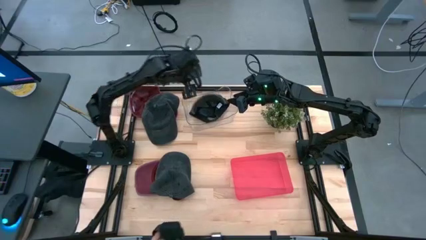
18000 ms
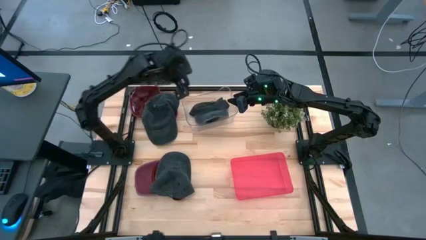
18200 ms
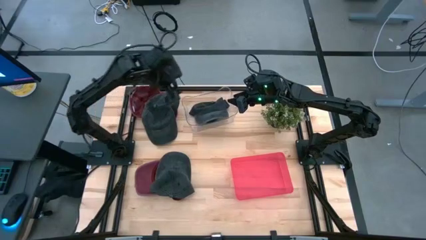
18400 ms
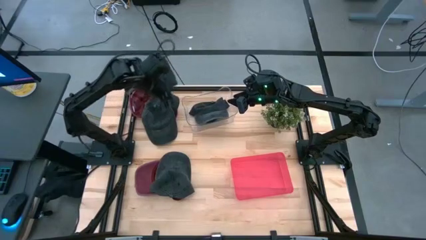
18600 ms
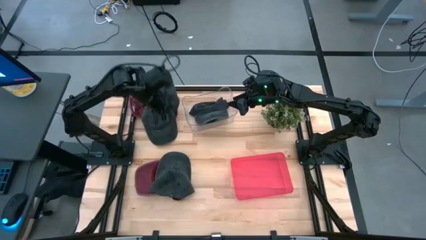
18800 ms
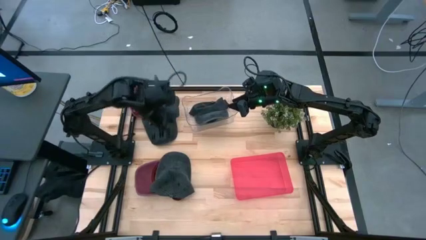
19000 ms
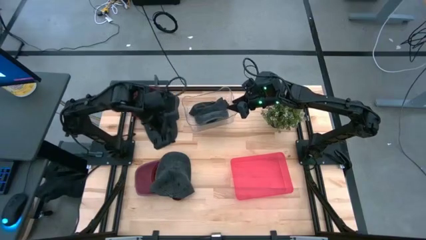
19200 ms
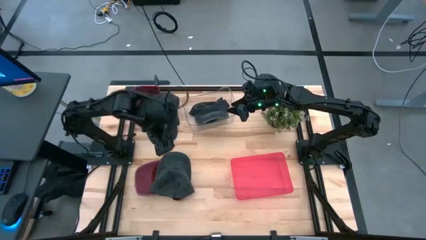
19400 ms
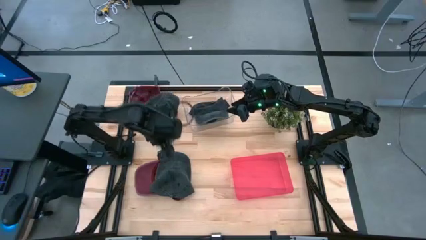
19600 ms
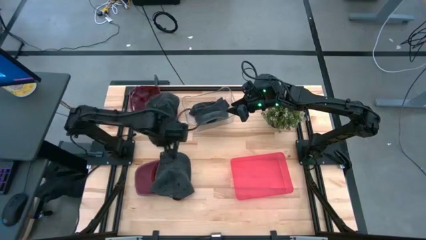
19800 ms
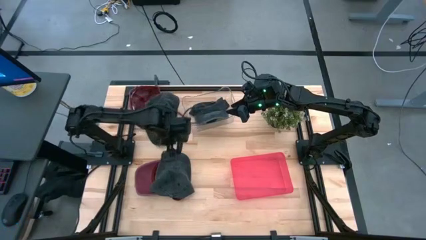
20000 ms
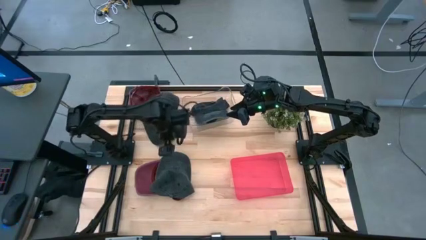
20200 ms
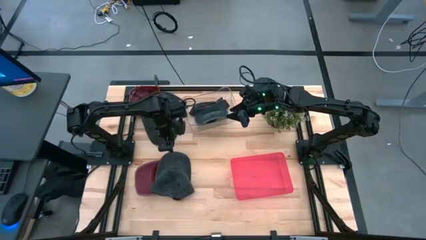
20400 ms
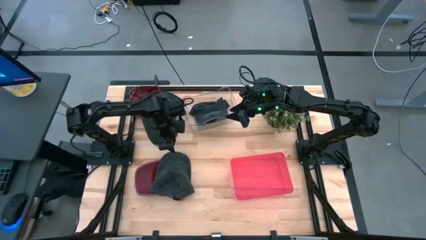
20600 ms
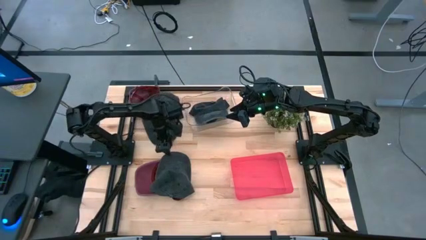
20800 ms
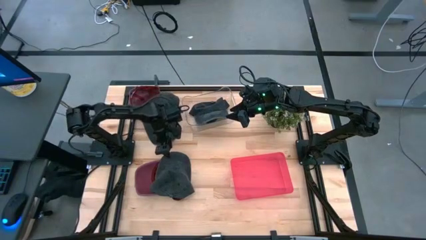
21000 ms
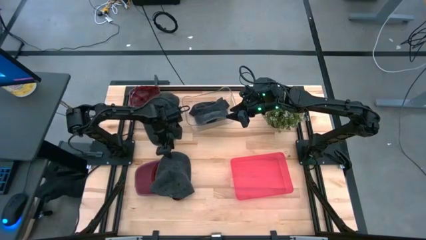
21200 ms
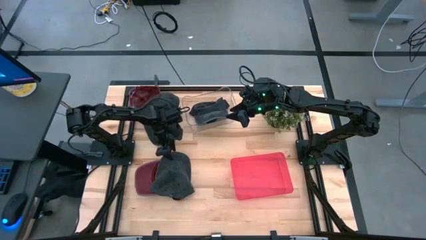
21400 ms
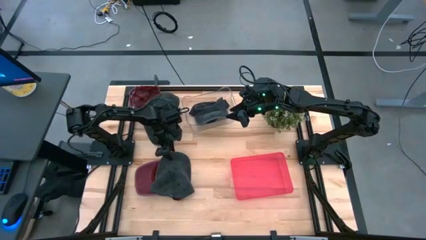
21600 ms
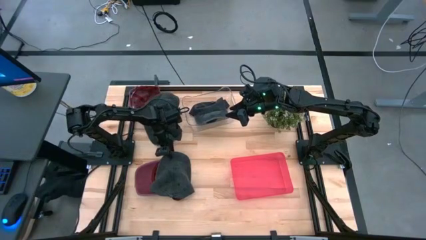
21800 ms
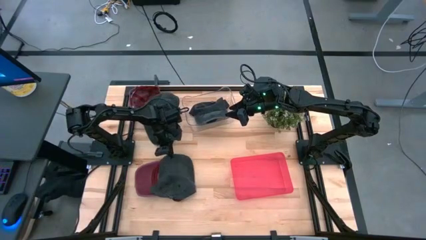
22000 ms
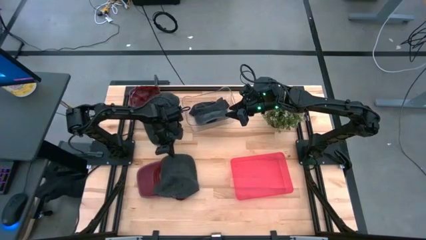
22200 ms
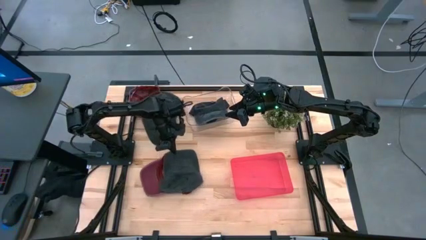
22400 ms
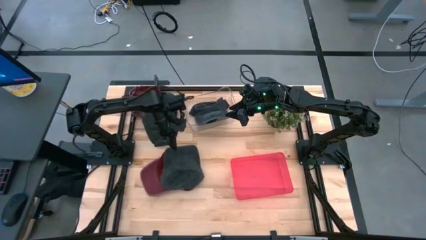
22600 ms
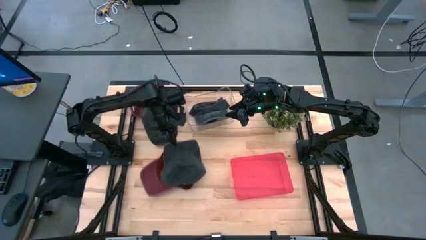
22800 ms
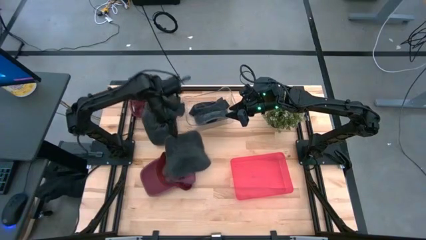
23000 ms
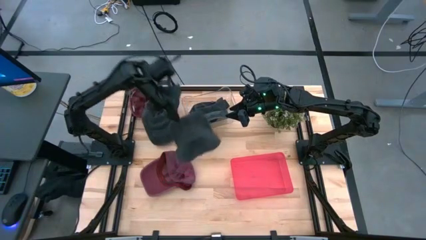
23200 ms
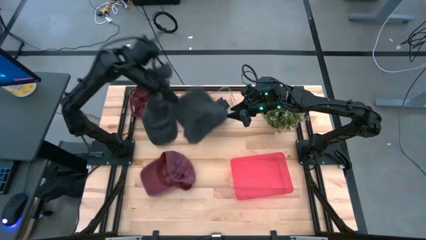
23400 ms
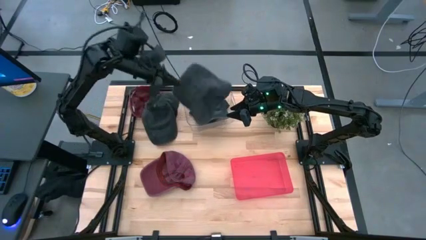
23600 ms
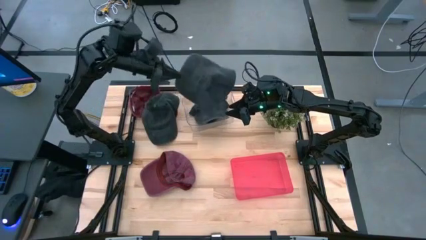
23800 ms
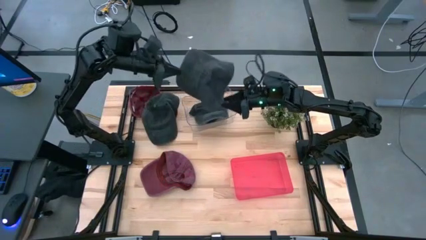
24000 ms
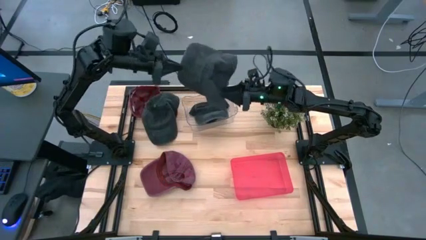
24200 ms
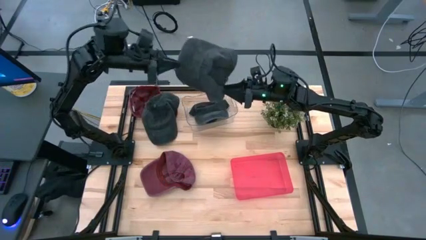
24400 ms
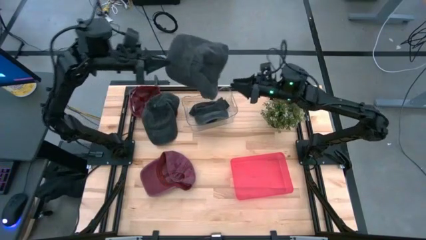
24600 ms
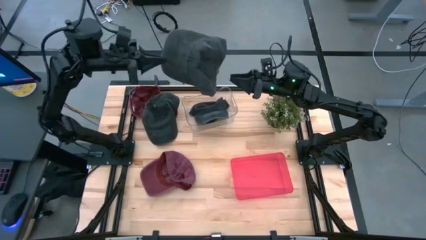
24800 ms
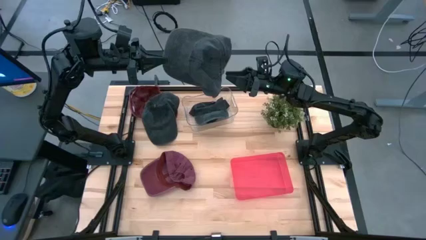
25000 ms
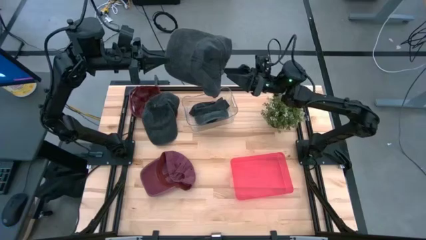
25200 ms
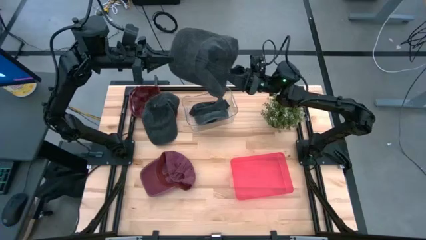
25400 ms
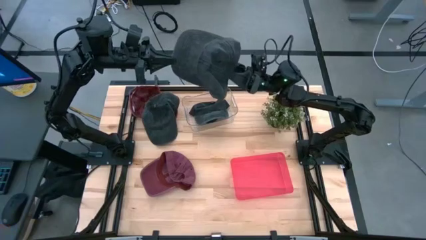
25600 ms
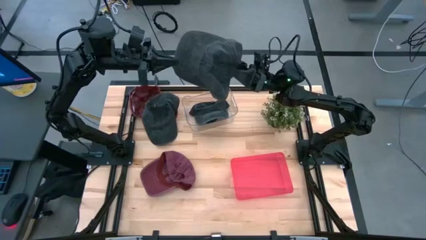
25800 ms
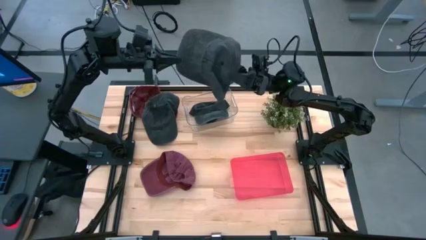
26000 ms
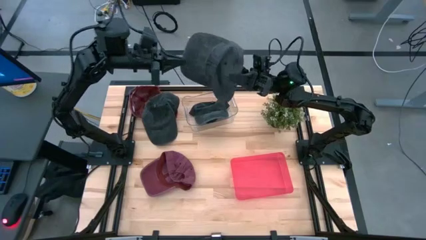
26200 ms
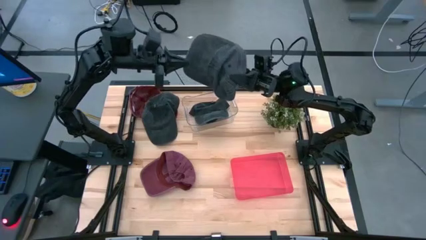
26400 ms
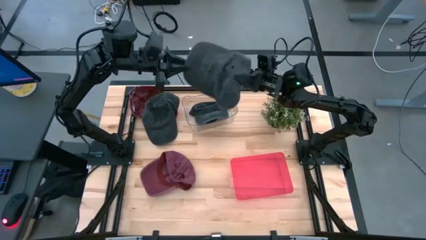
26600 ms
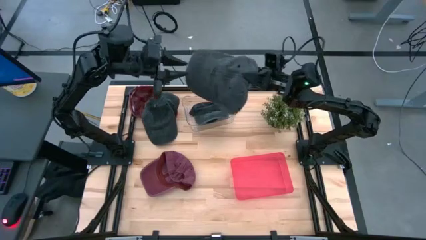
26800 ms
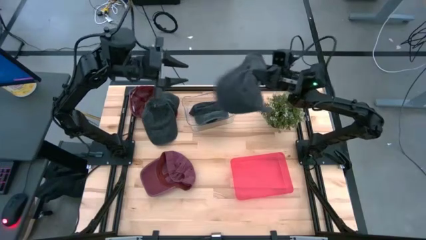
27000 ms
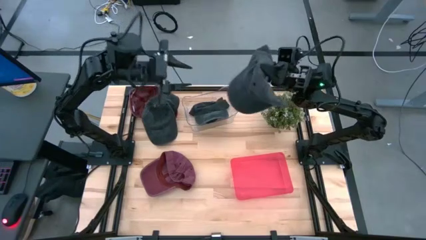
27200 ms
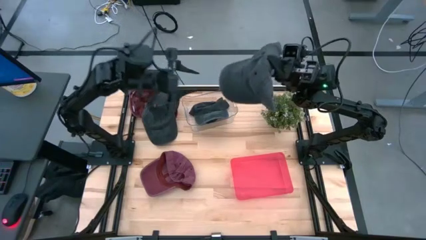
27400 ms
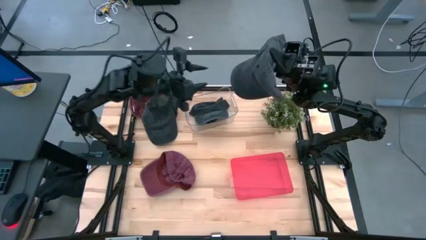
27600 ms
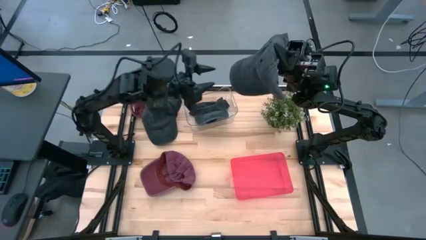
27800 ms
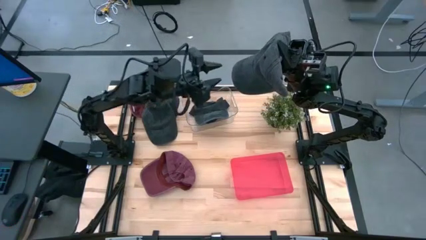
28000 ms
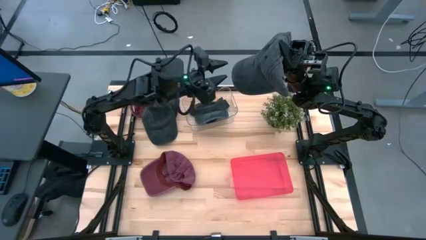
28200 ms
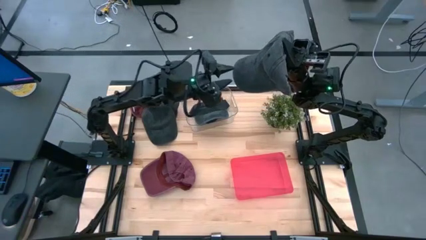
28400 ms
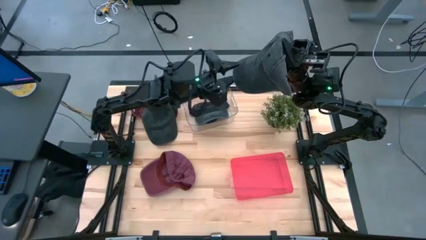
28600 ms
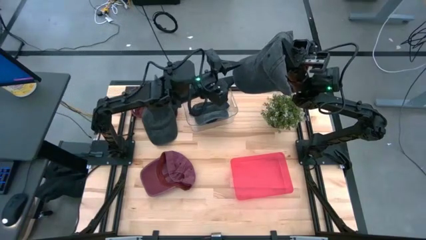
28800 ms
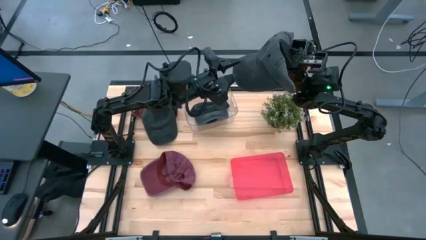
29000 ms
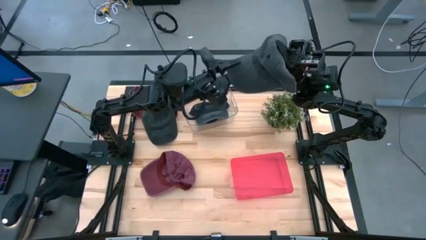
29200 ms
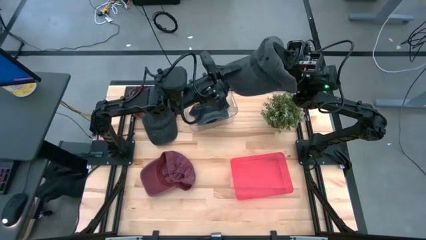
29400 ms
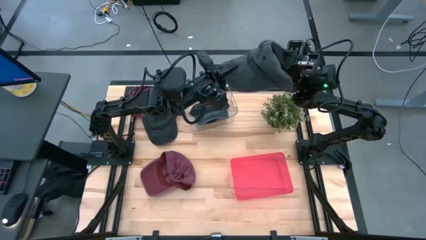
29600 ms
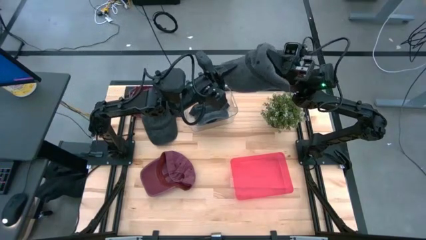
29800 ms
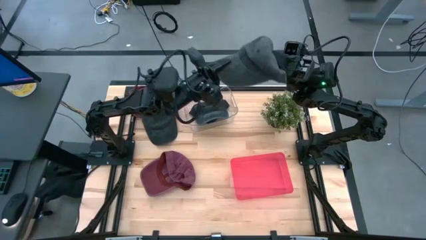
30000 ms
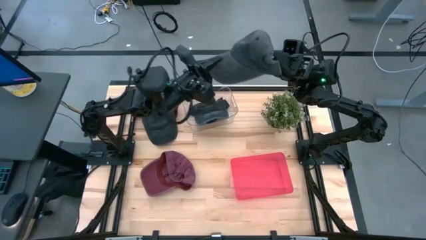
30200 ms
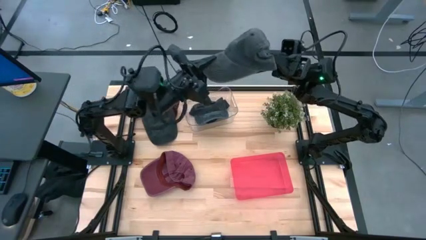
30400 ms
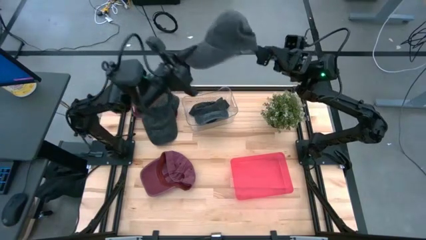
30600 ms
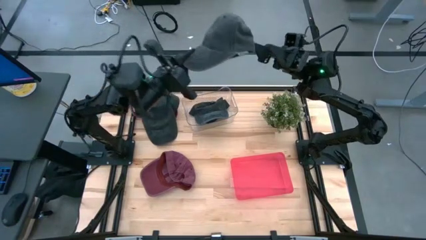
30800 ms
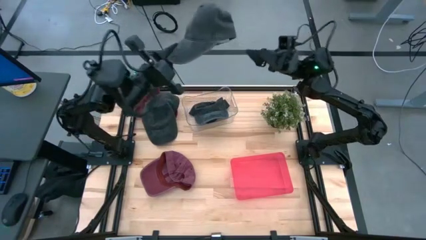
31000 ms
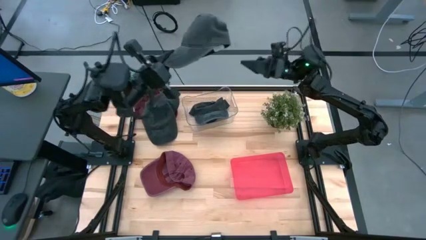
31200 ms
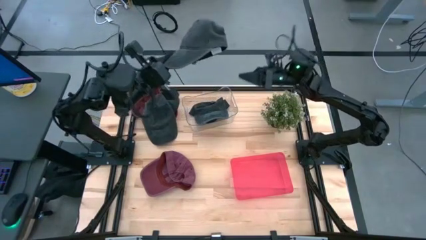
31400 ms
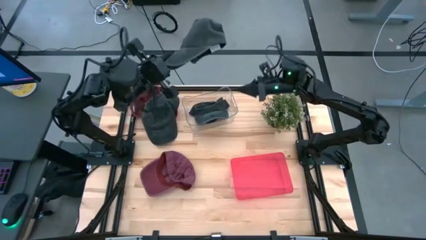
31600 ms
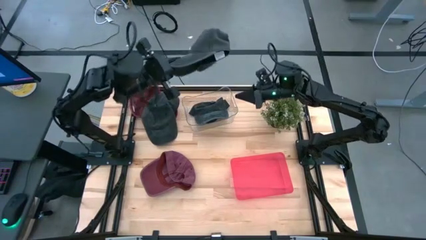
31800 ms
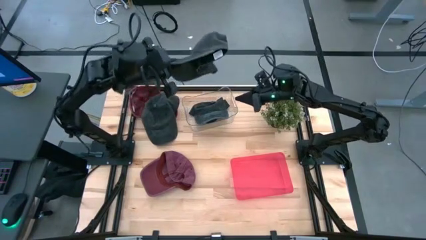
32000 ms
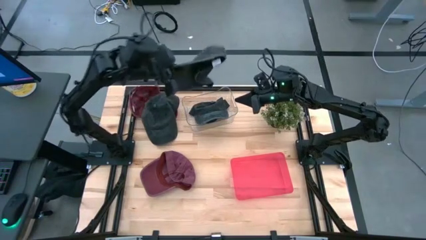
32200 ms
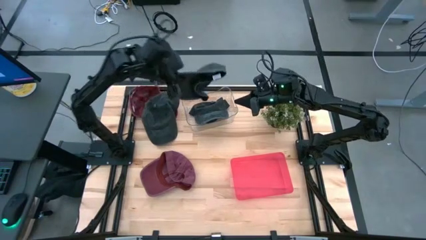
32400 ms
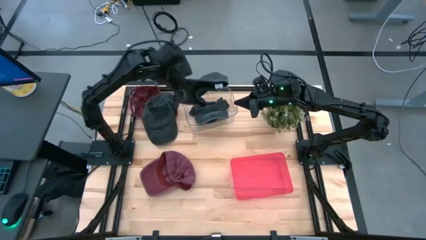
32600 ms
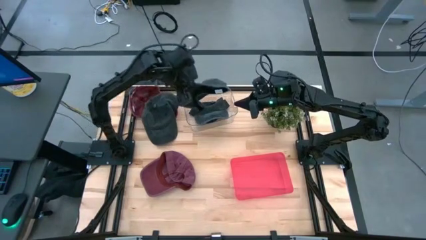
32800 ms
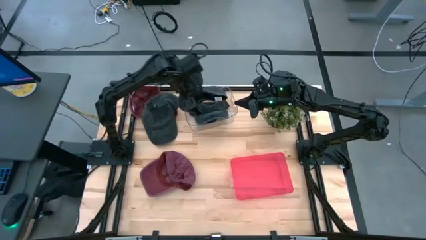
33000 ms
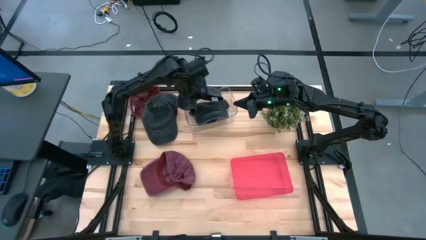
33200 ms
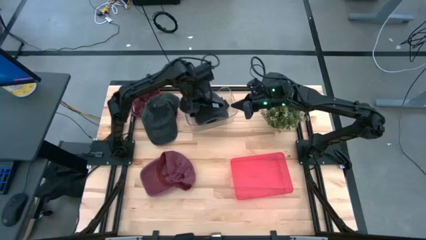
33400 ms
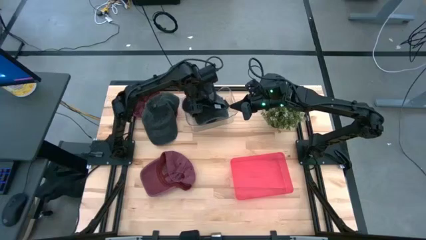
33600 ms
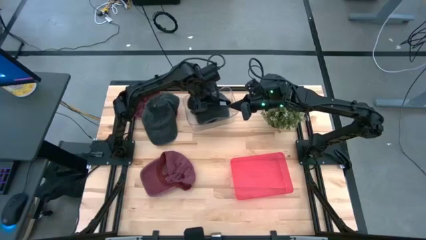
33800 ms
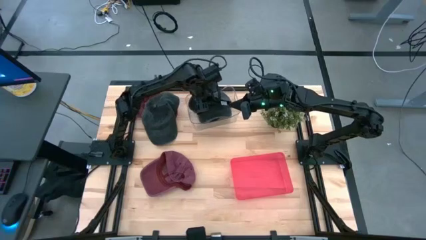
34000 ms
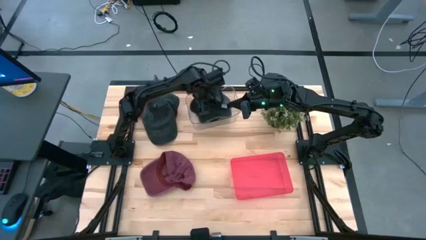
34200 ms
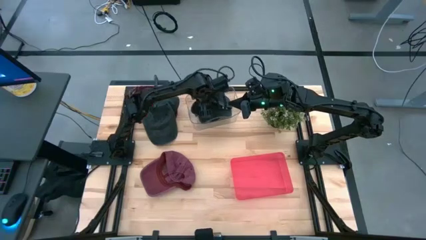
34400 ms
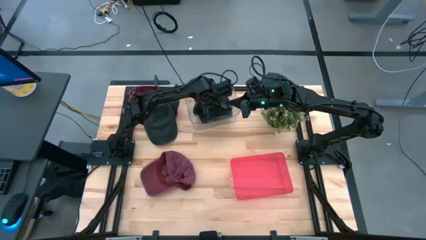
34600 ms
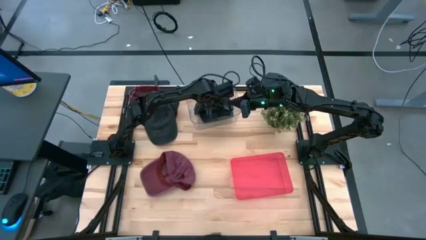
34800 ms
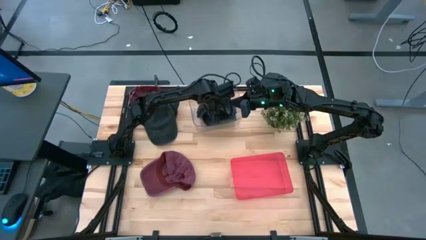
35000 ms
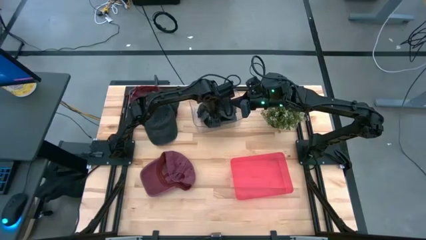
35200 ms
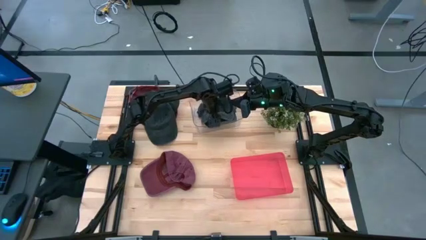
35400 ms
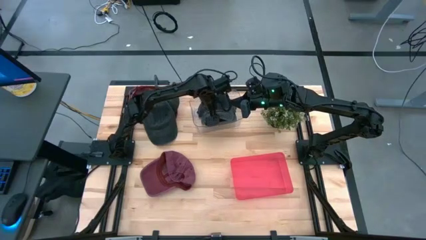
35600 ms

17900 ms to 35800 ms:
Task: Pick & Place hat
Put the bottom black cap into the transparent bin
